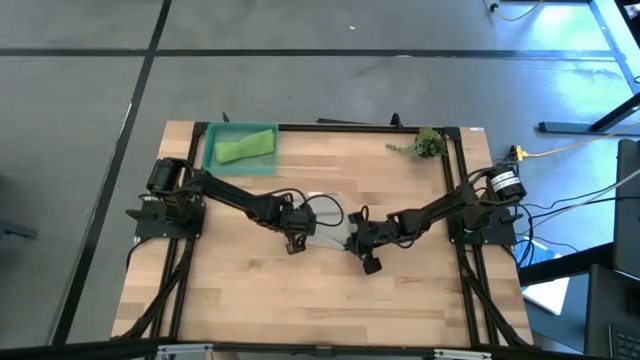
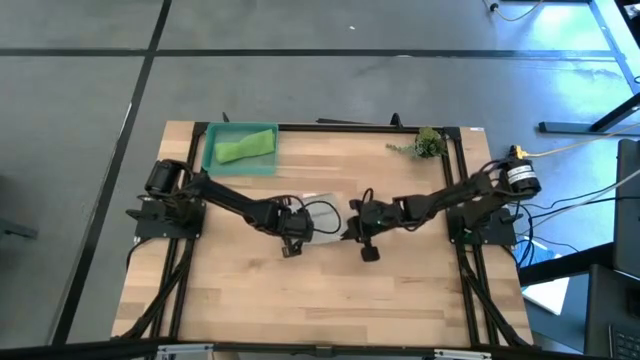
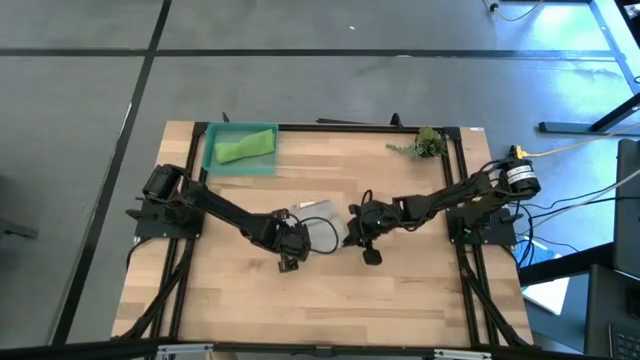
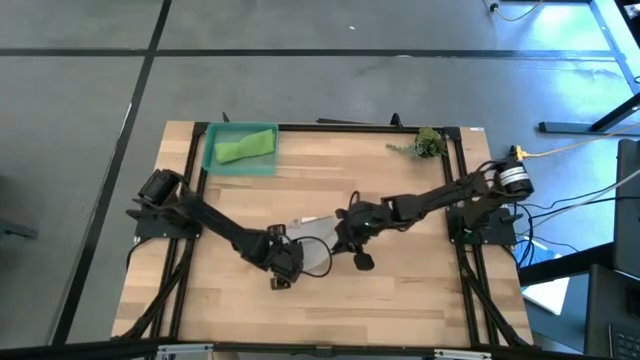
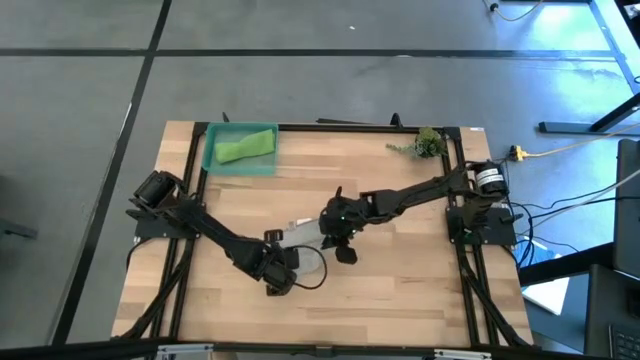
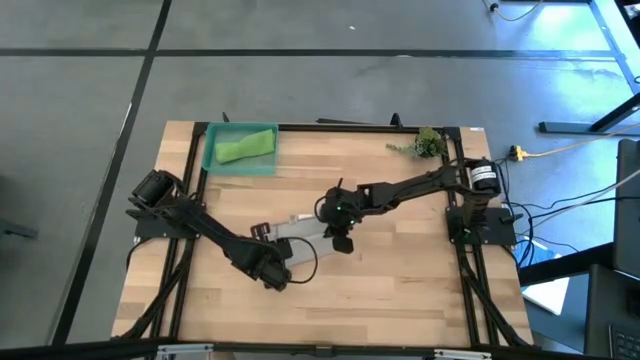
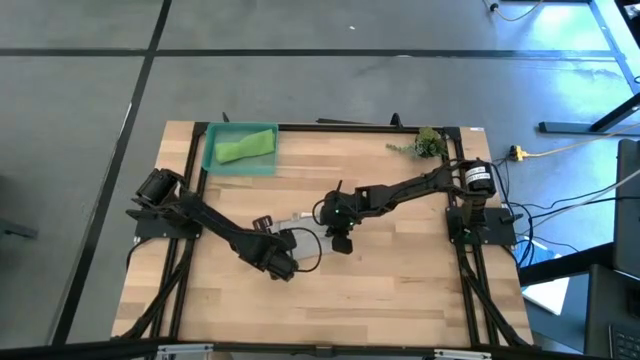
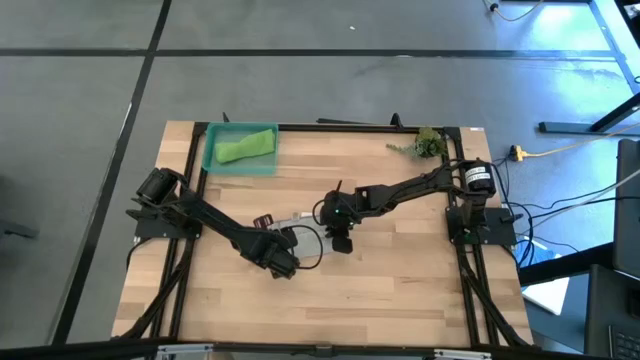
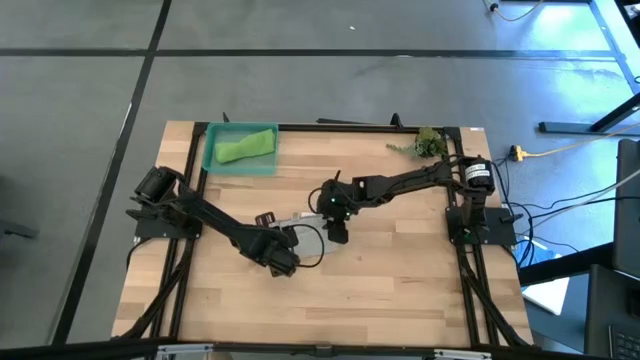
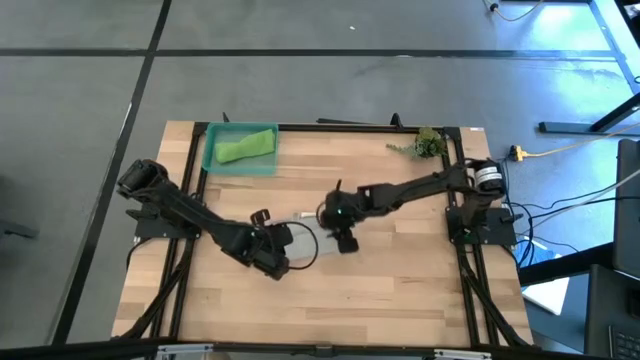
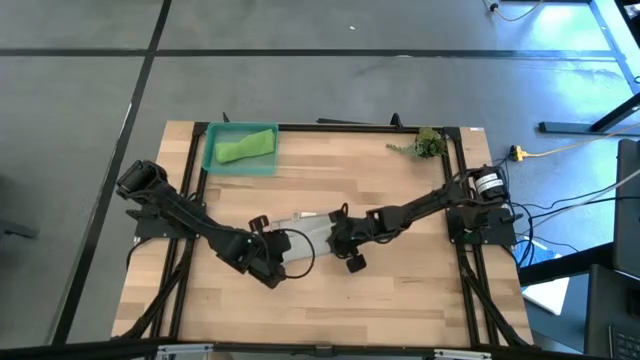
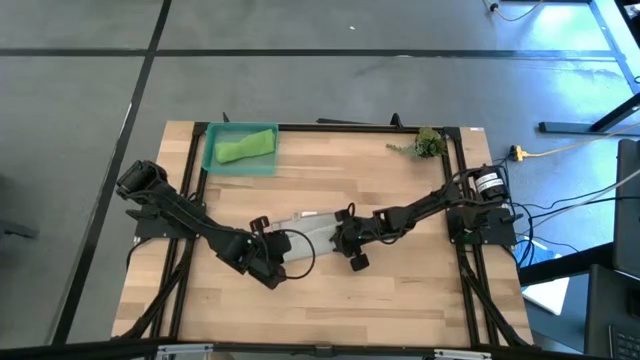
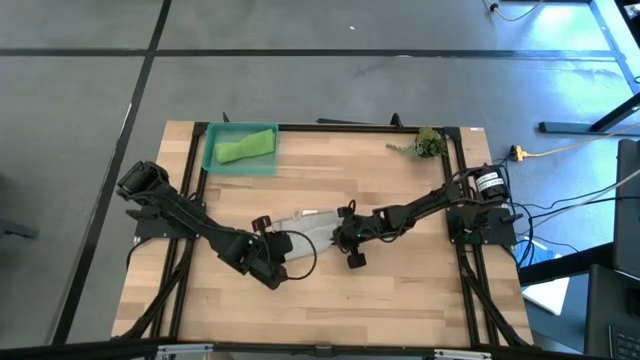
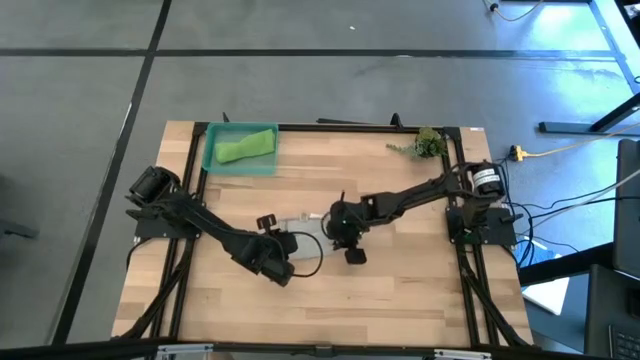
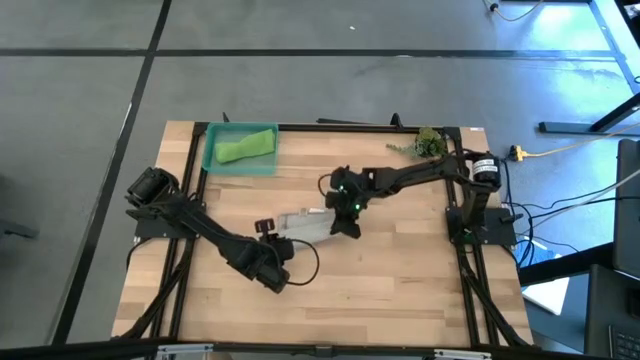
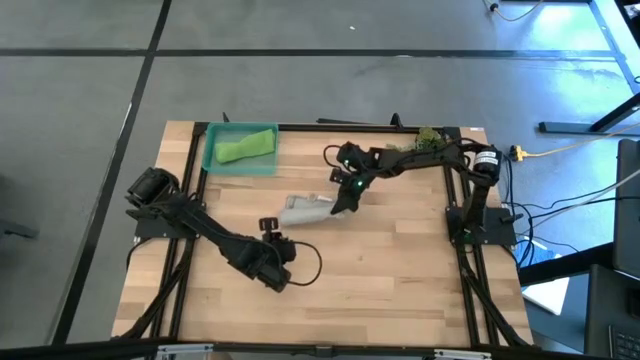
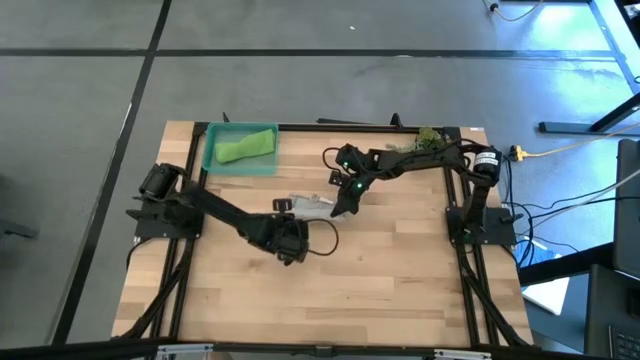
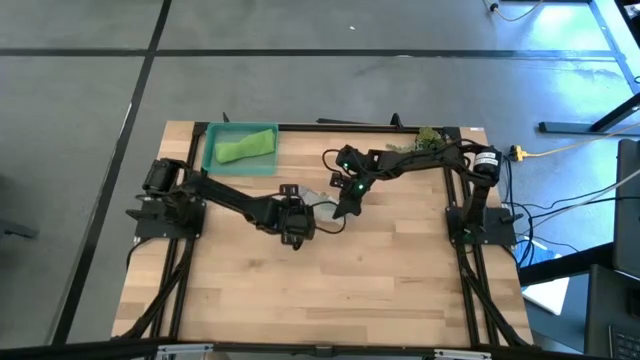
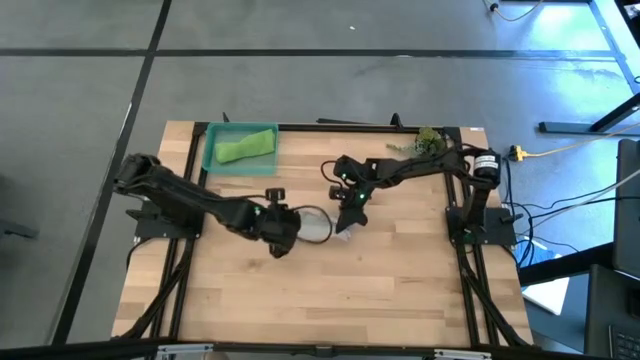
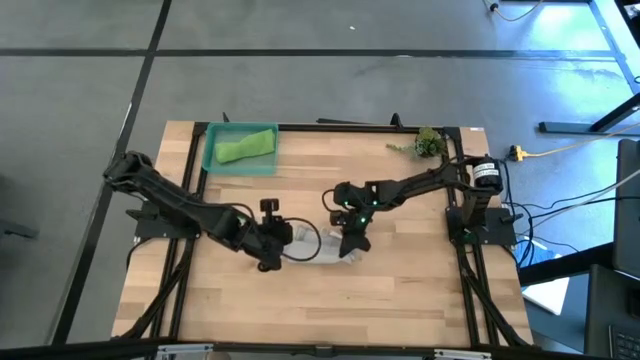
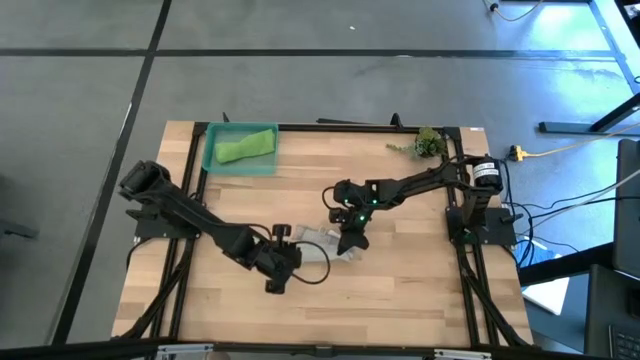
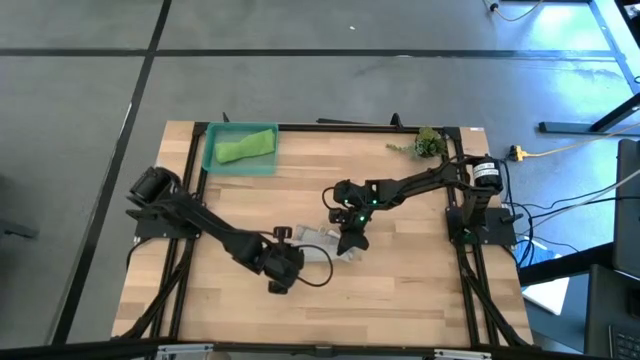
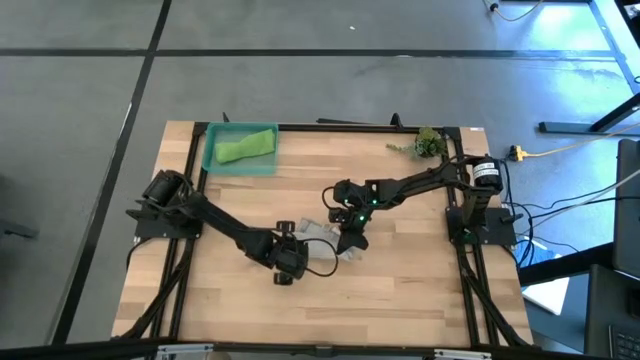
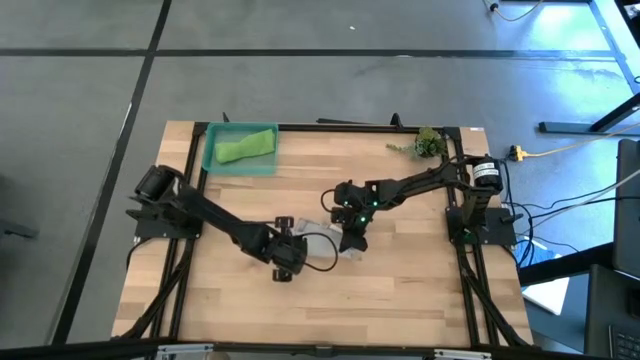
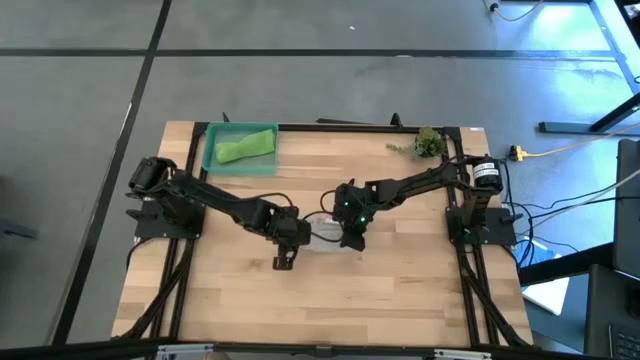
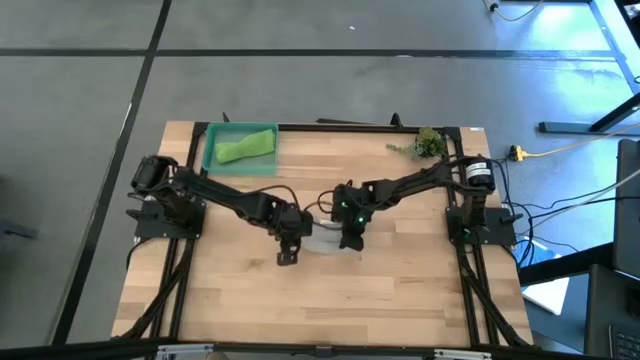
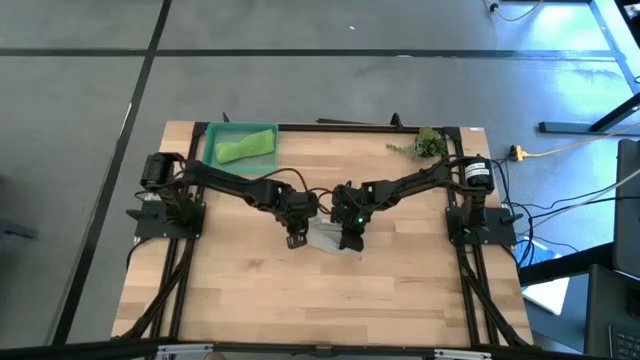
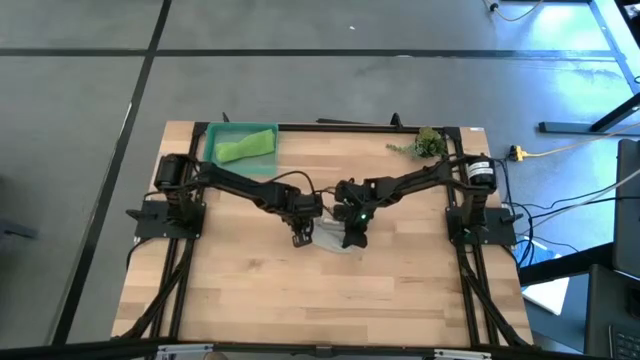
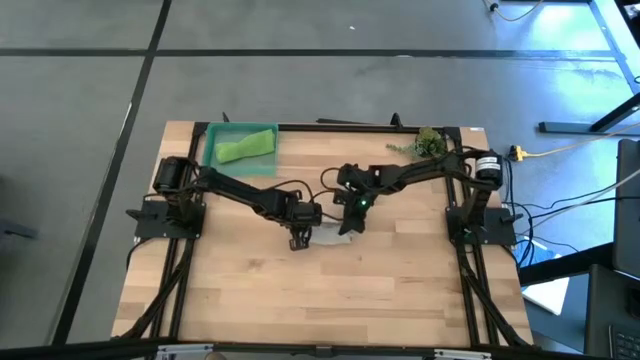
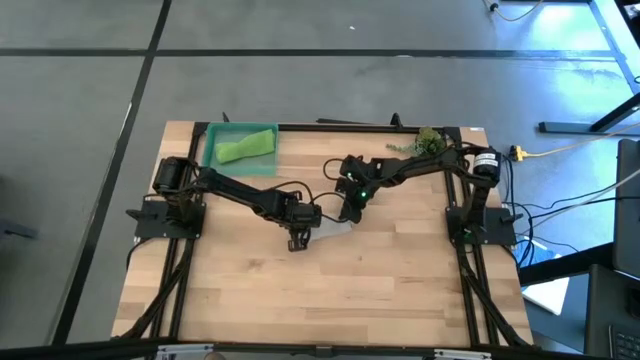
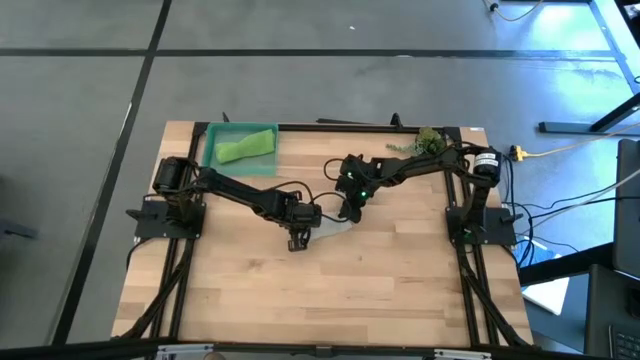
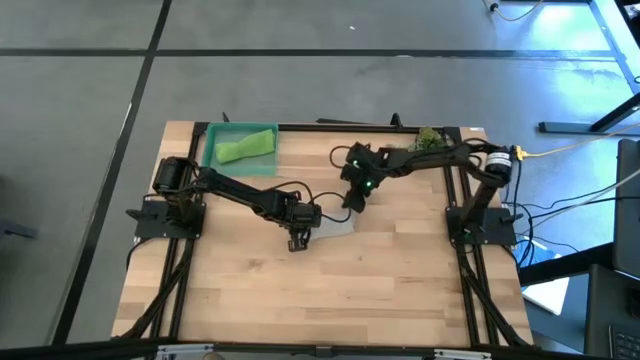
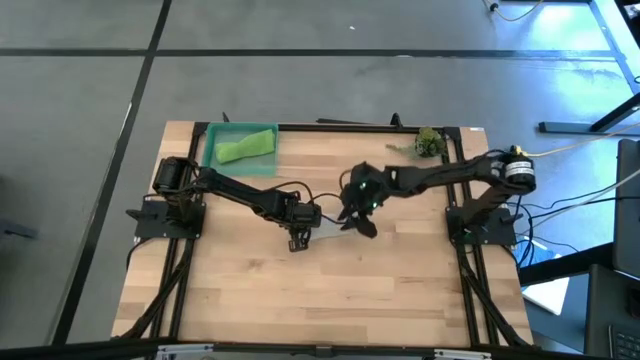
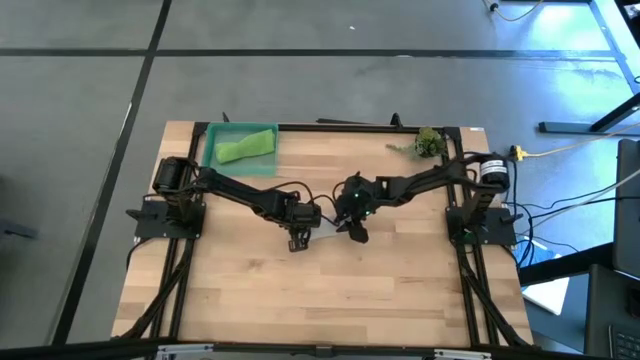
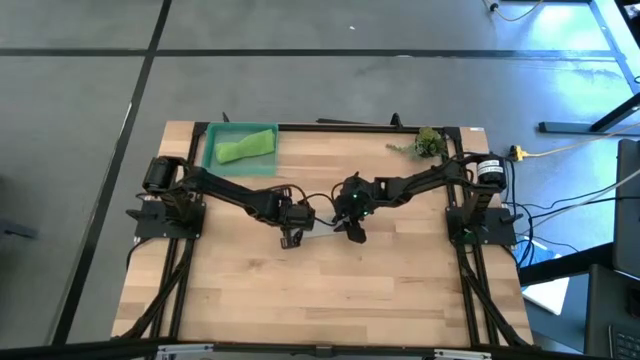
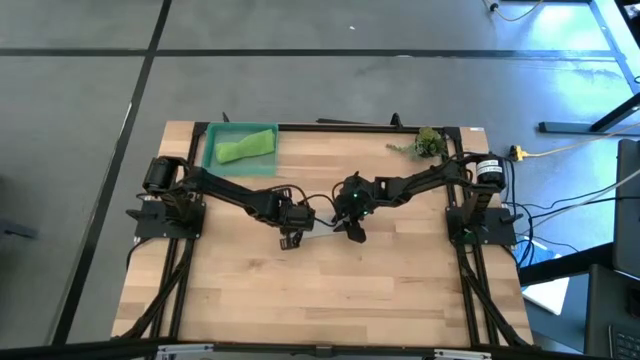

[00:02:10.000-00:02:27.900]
Task: Roll microfiber towels into tight, uniform cylinder then place into a basket
Roll the gray towel

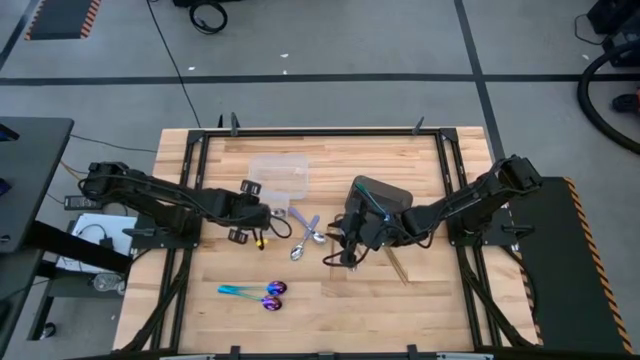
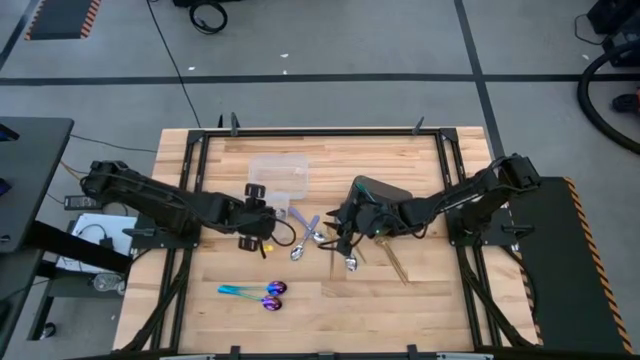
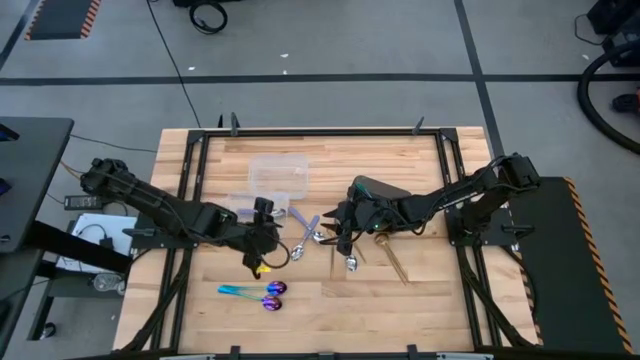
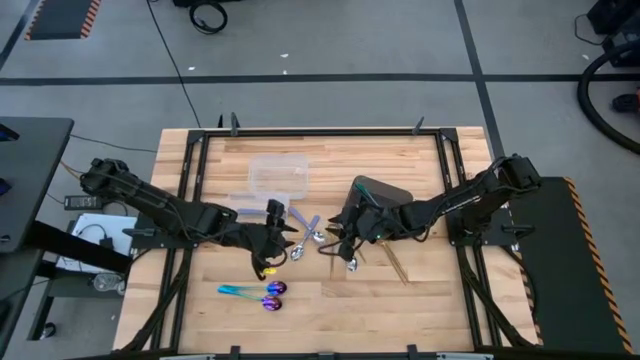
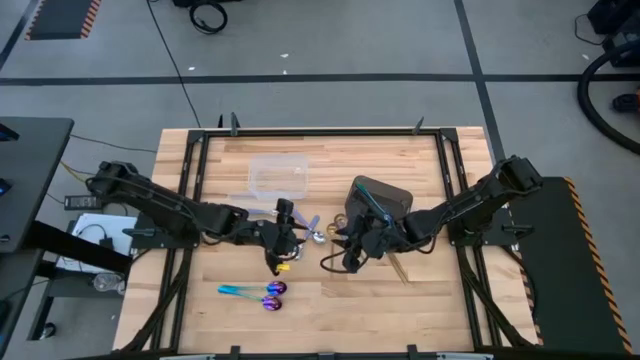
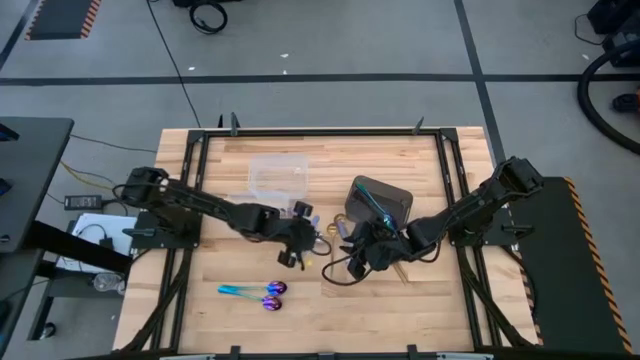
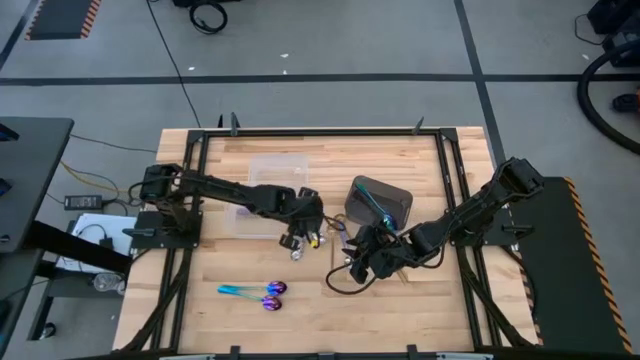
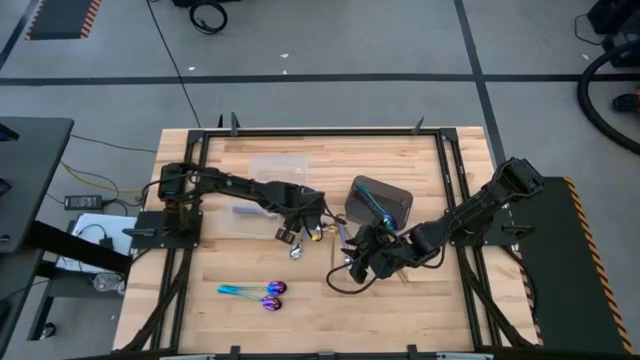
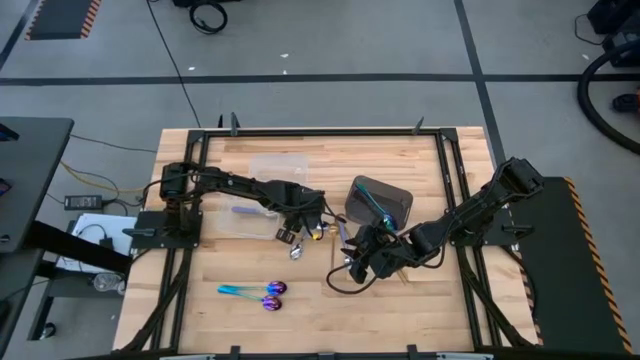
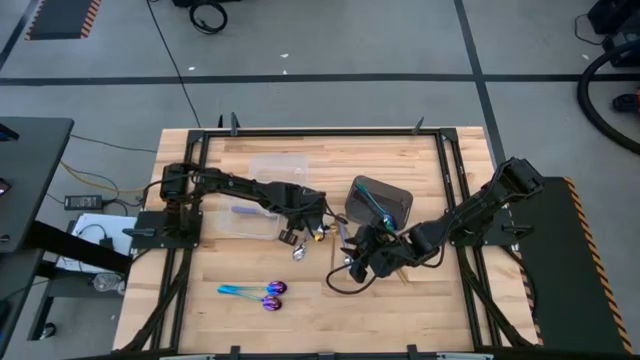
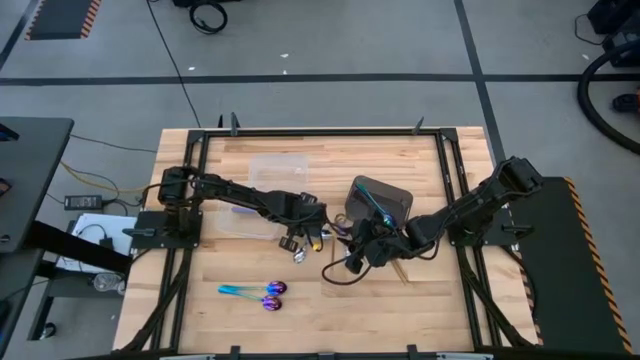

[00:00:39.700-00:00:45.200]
Task: Sort silverware by color (type)
Put the blue spoon into the bottom transparent bin
